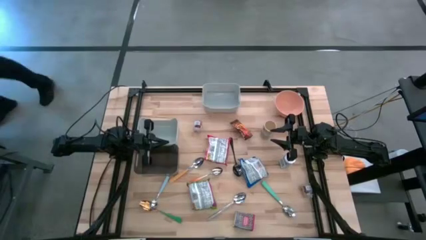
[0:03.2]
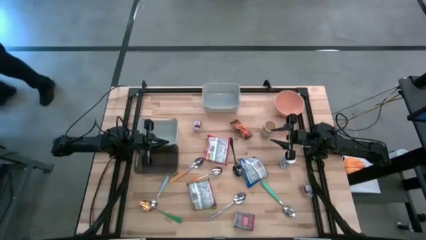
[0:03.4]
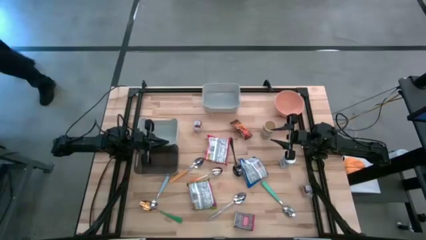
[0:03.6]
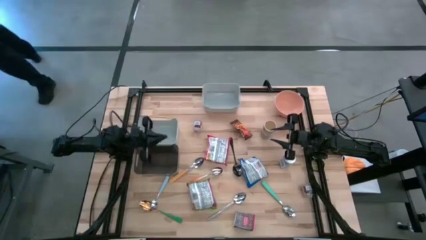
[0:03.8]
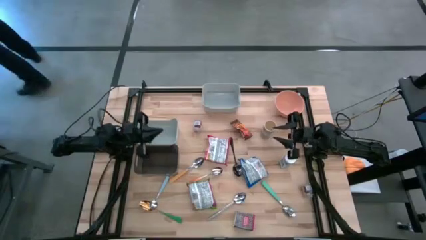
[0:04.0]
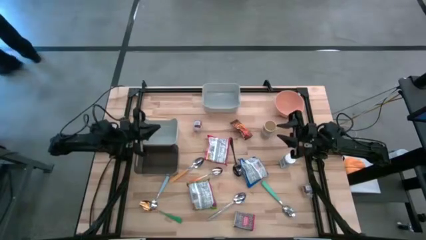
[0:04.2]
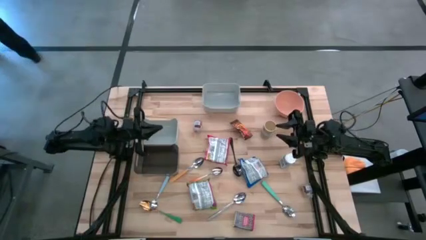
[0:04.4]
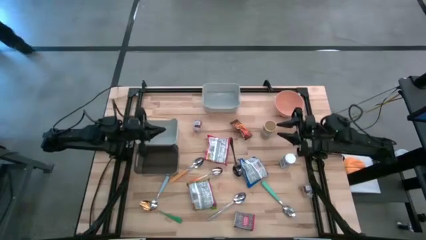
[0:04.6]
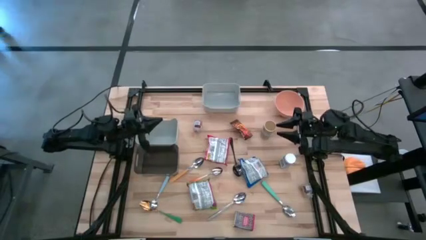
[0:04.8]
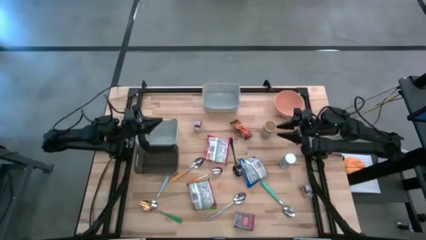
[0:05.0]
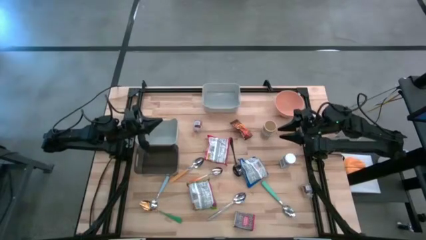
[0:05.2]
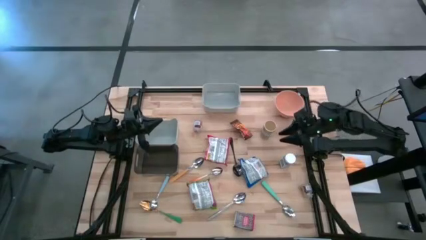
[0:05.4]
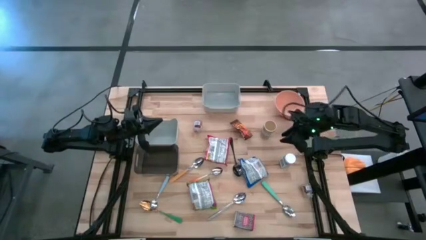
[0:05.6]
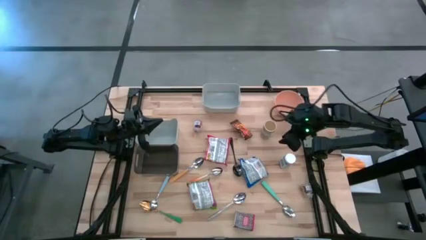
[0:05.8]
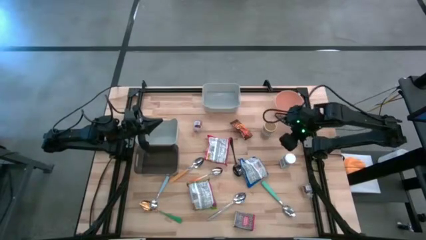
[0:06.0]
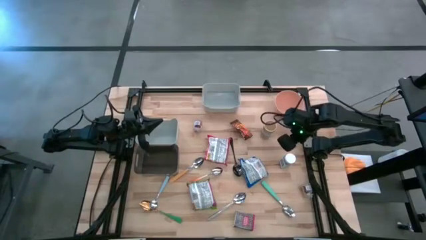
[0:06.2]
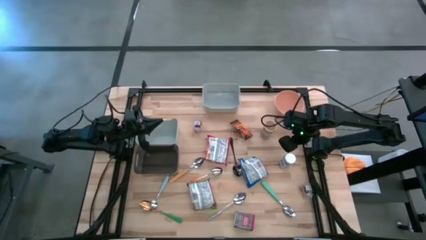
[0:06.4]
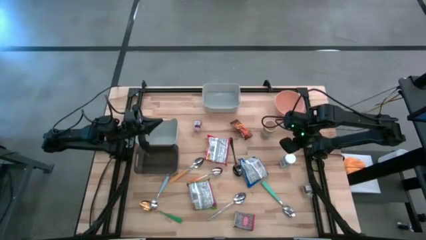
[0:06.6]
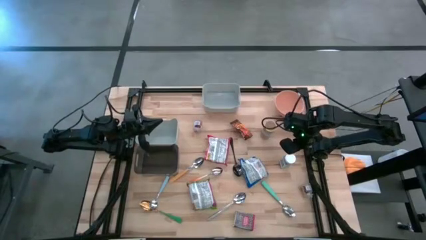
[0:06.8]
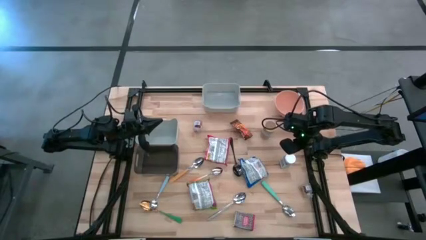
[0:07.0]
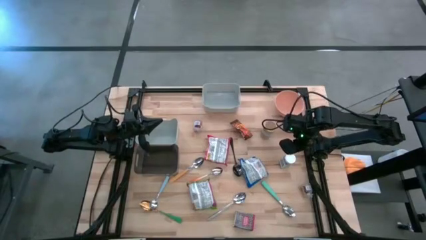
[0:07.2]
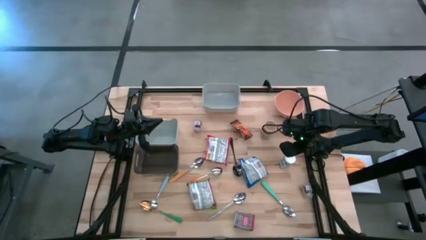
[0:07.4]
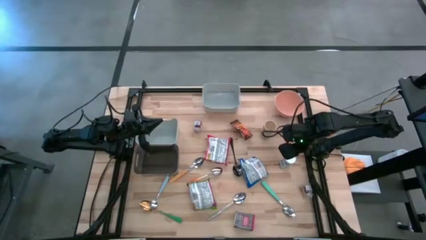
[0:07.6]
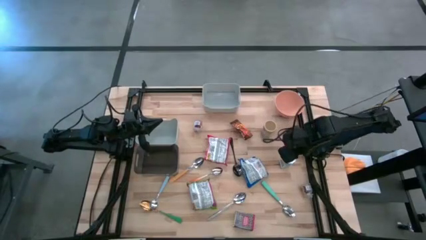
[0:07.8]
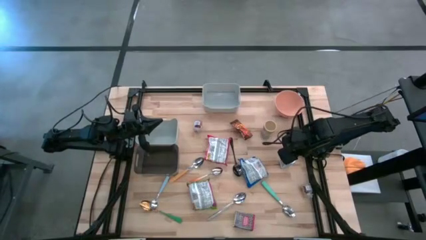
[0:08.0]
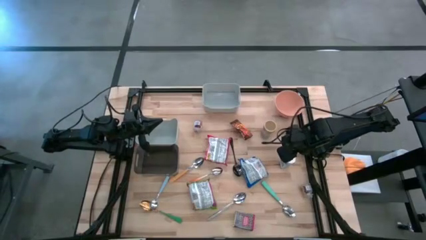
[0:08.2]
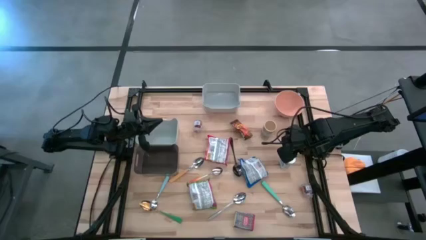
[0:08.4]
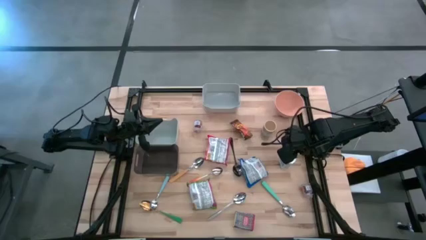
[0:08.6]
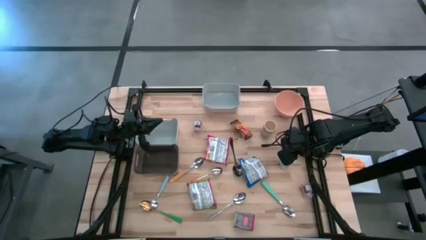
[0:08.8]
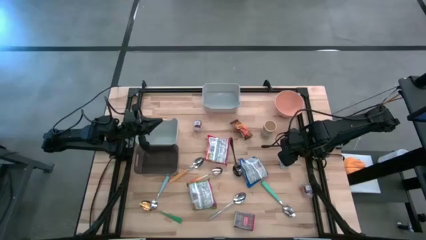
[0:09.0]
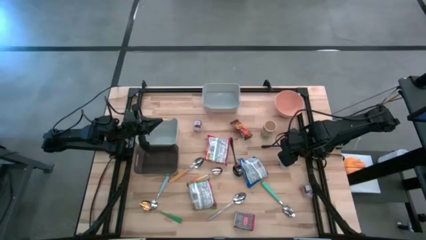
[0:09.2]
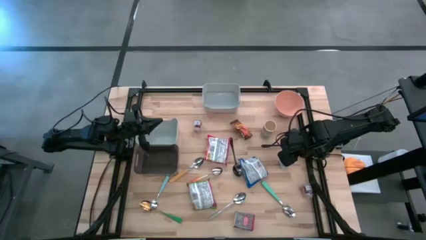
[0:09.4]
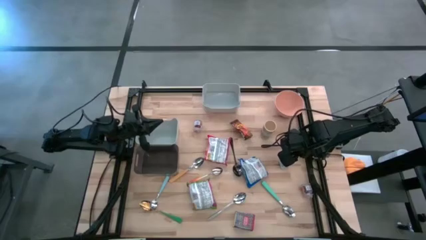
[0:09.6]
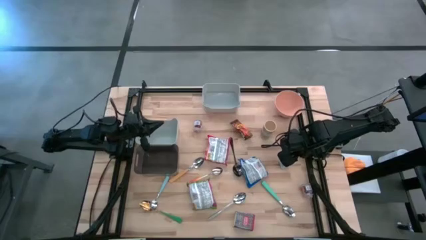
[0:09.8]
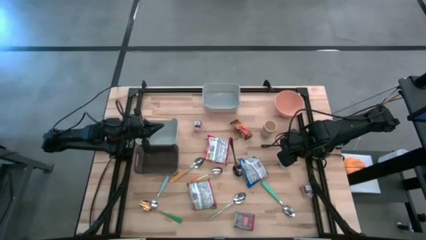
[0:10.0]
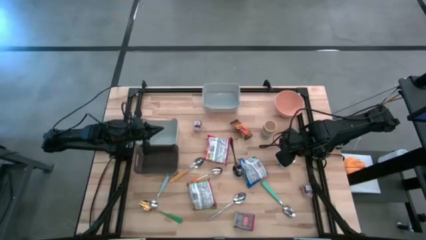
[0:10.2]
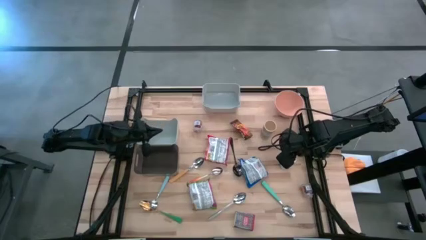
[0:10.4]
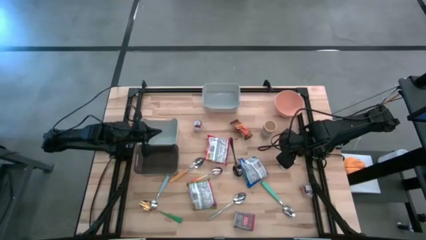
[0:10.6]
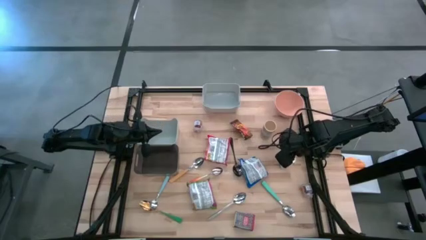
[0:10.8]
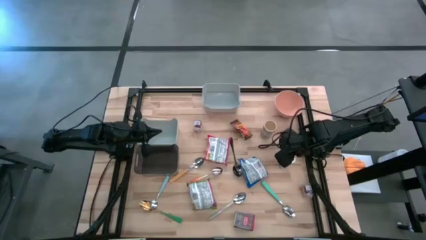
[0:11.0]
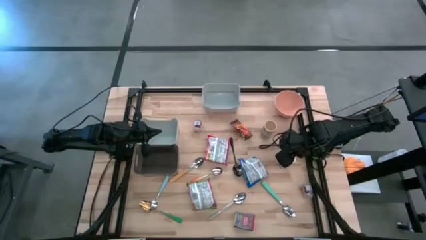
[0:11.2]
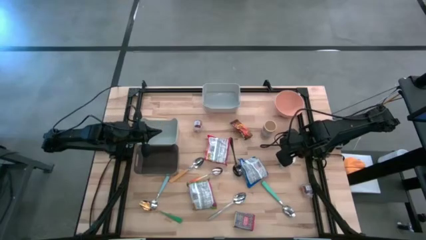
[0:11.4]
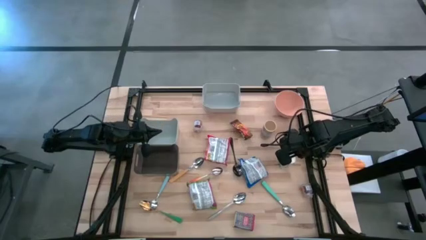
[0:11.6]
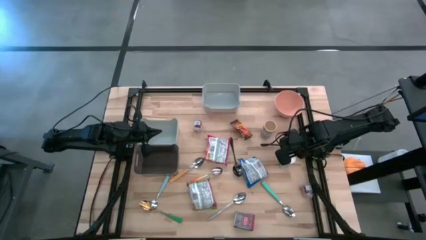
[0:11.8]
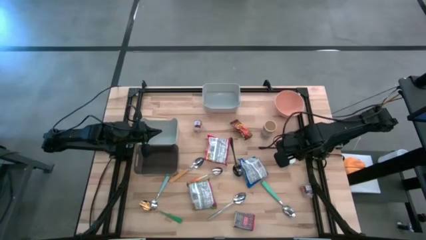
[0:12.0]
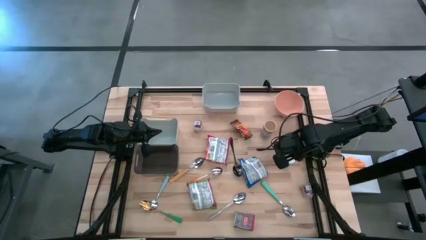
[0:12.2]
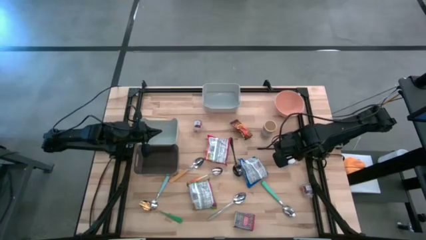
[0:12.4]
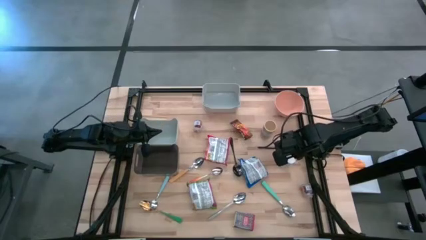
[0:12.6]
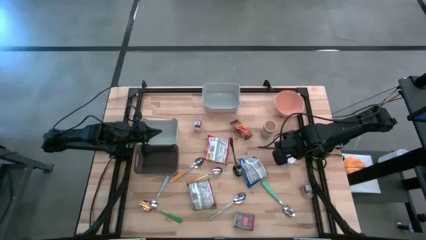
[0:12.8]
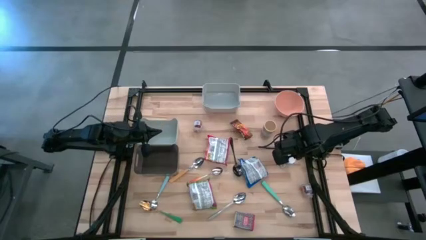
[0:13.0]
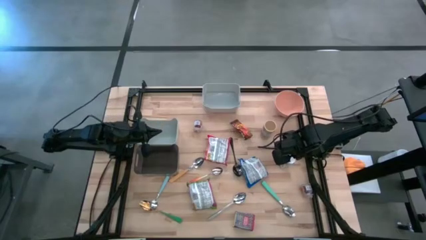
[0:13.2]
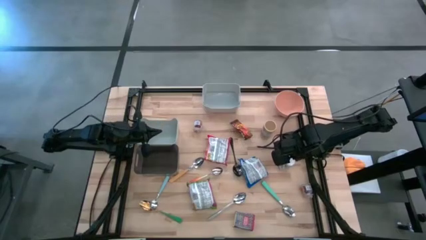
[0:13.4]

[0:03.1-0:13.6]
Put the white spice bottle into the top gray bin

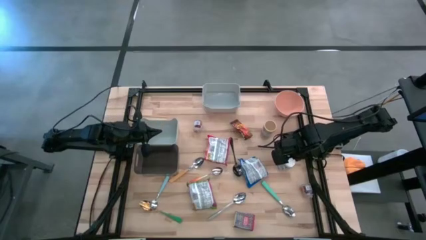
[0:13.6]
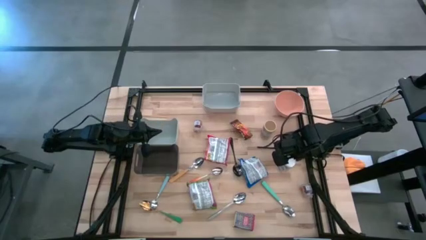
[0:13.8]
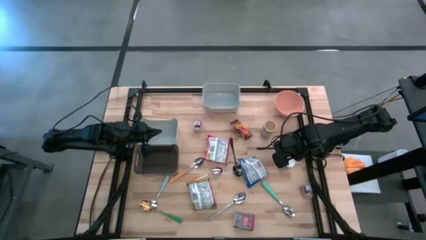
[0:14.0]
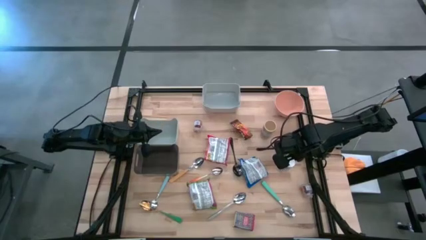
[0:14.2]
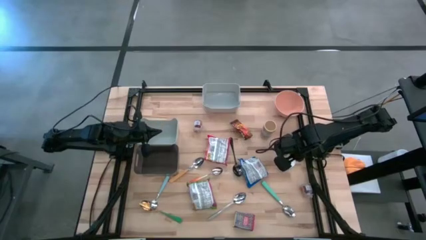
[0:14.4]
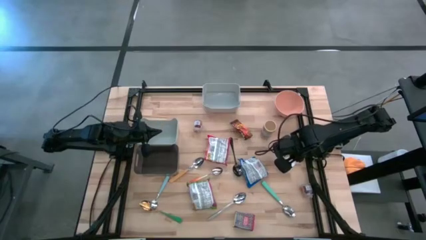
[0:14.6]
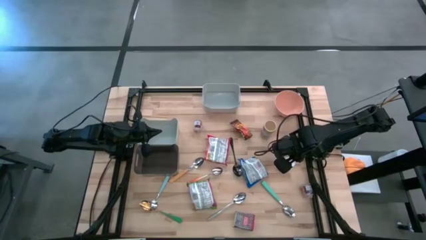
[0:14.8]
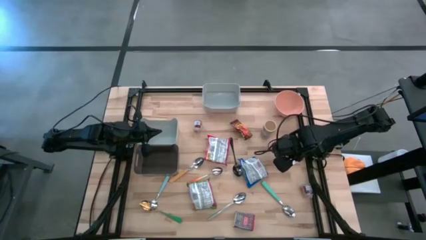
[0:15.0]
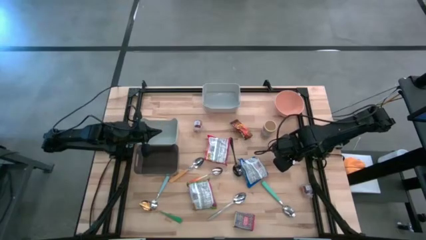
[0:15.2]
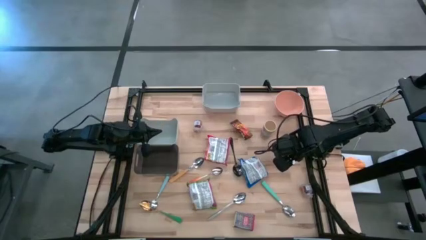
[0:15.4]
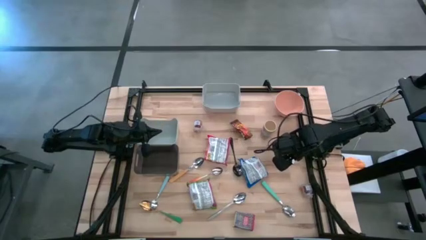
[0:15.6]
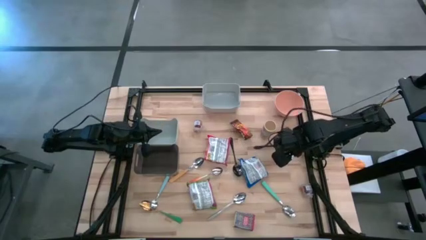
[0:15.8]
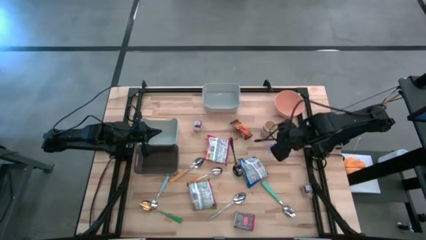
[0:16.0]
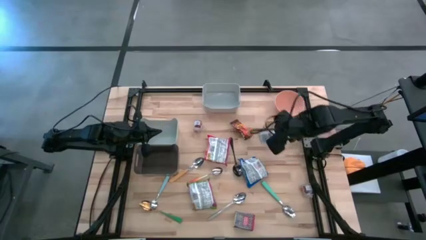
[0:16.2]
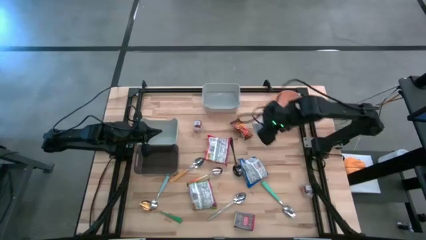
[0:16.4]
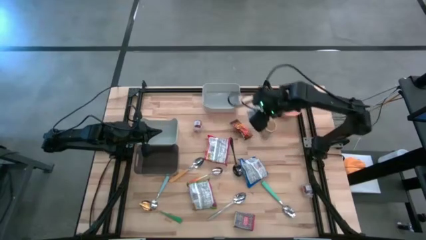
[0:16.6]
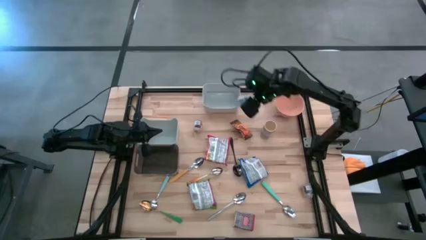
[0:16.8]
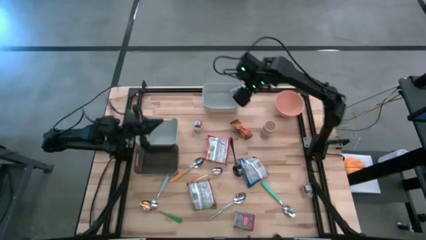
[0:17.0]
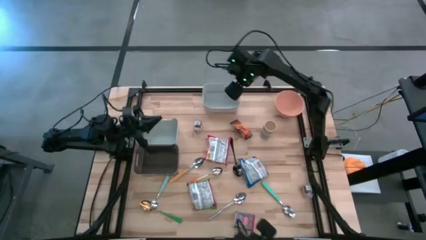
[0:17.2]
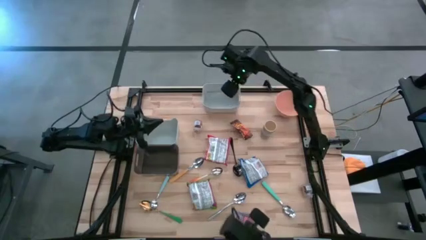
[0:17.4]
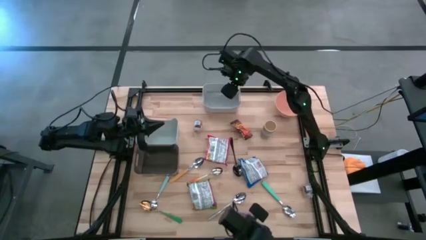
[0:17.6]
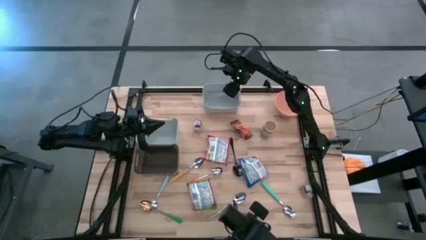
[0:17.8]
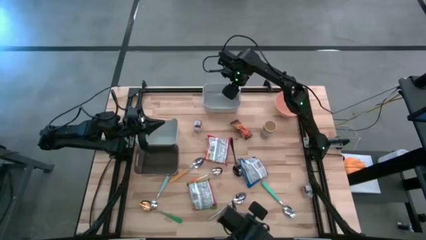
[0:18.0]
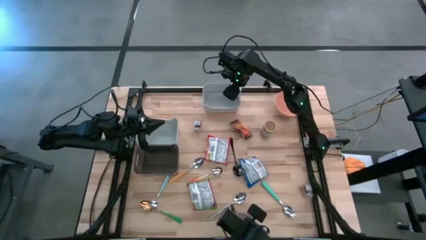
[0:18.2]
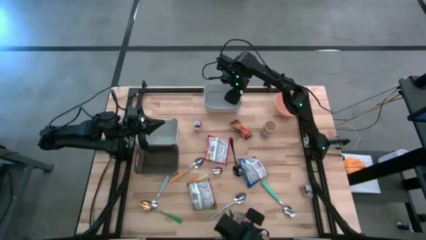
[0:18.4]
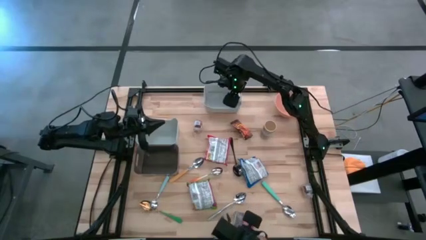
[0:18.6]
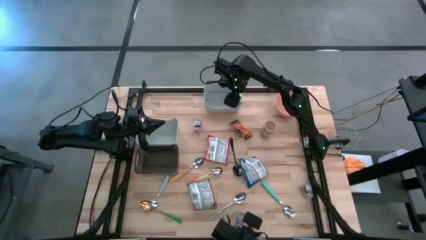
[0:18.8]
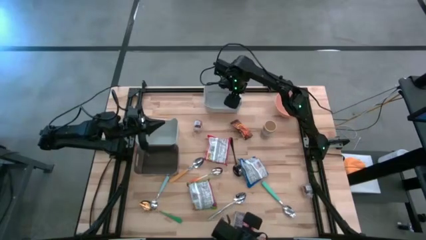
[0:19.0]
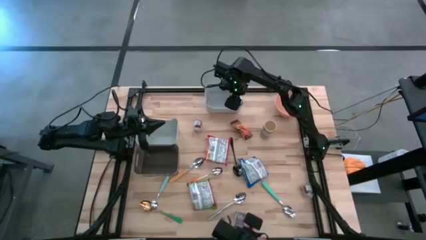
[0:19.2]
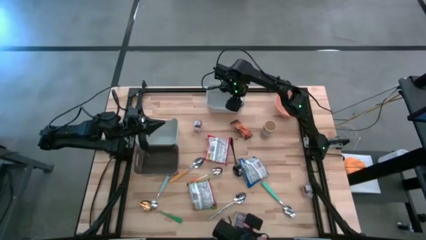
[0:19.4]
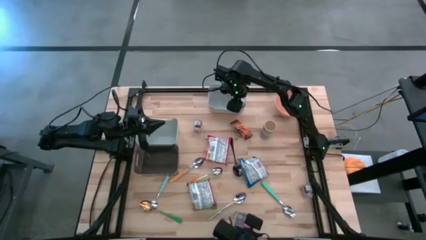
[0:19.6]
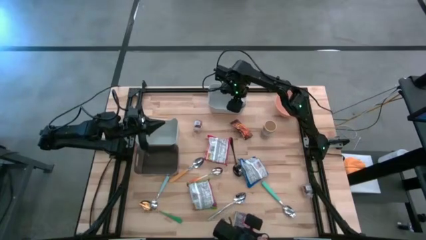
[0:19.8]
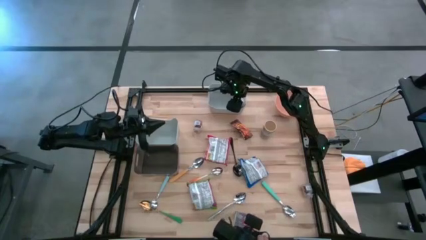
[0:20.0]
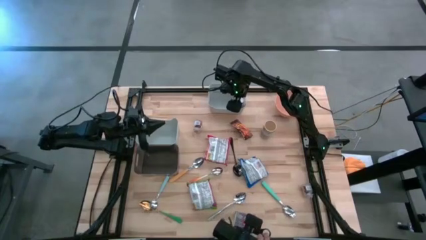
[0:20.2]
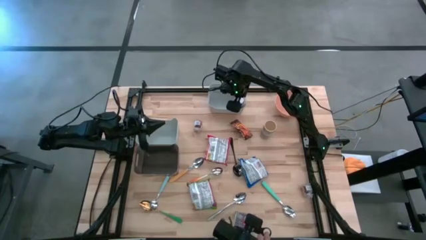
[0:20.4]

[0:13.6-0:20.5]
Put the white spice bottle into the top gray bin
